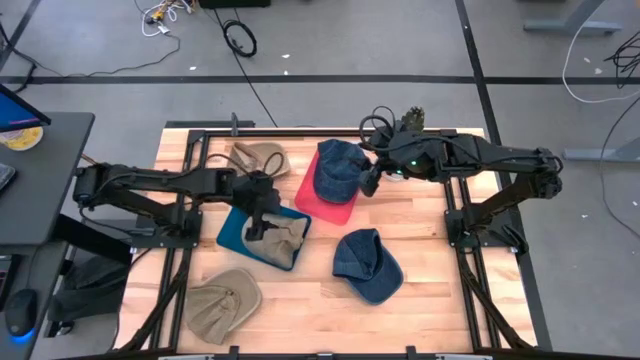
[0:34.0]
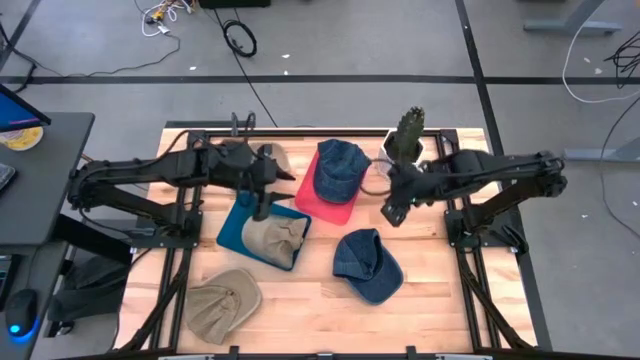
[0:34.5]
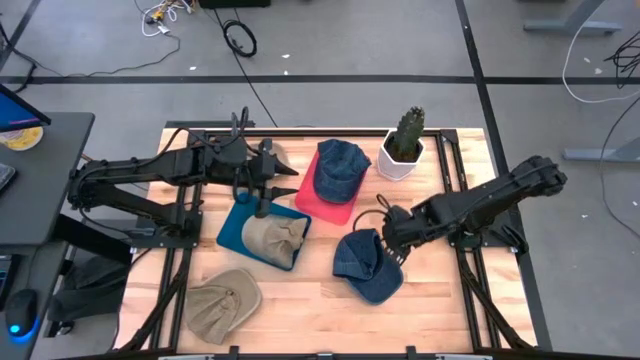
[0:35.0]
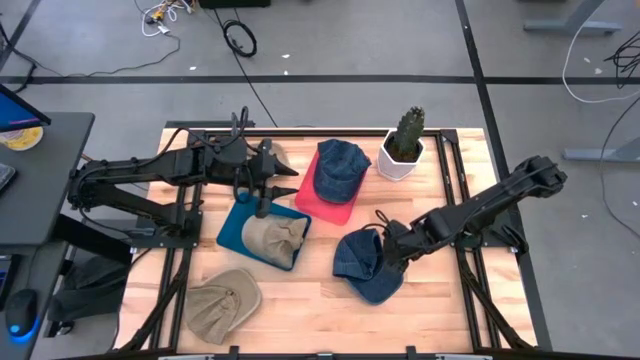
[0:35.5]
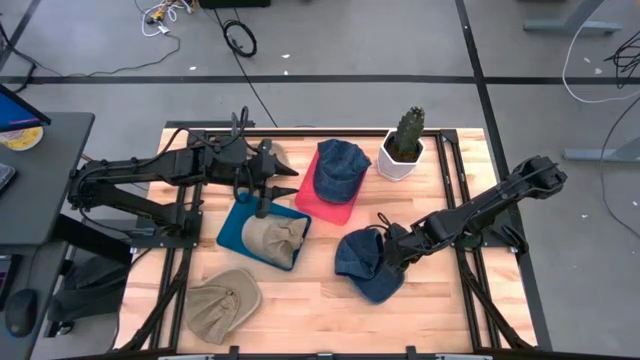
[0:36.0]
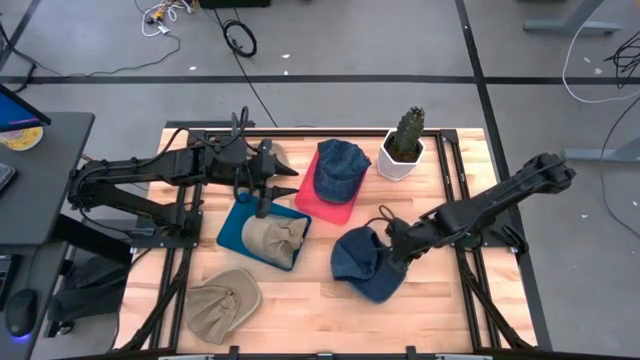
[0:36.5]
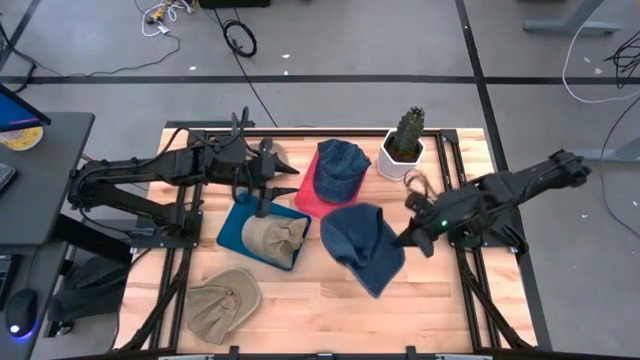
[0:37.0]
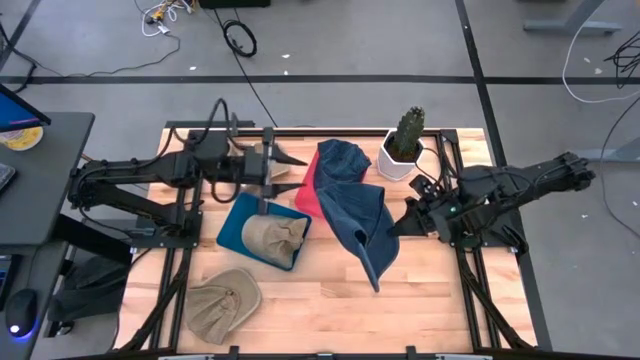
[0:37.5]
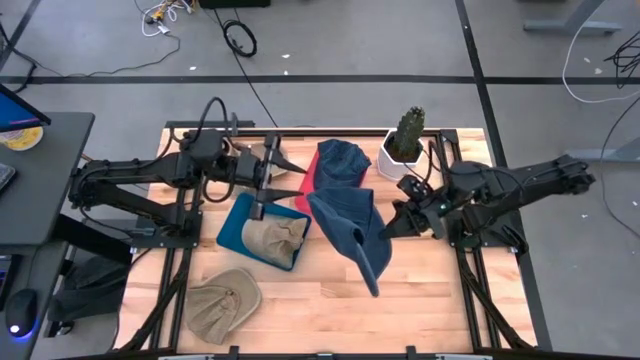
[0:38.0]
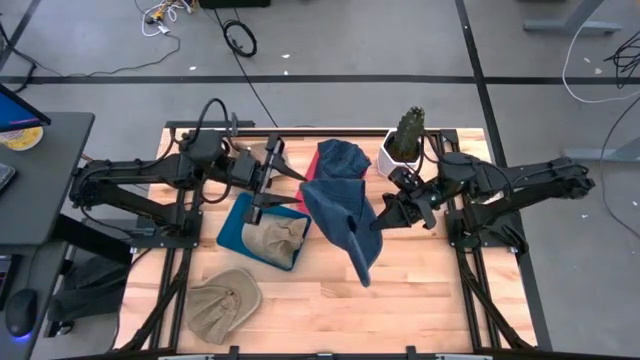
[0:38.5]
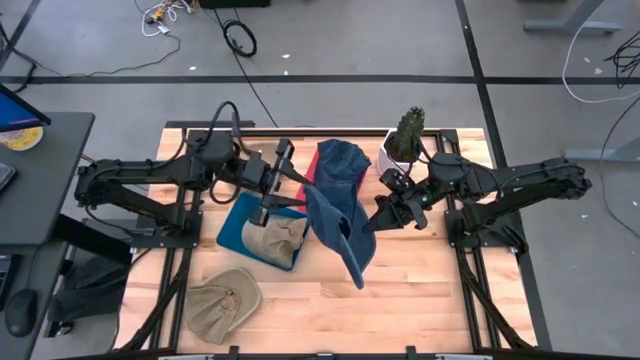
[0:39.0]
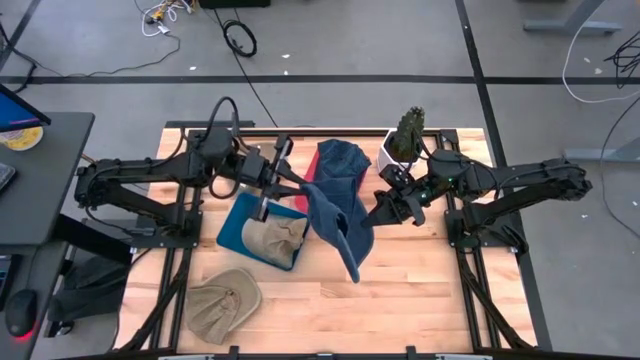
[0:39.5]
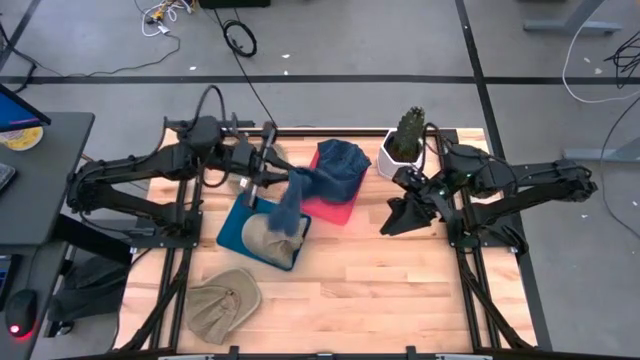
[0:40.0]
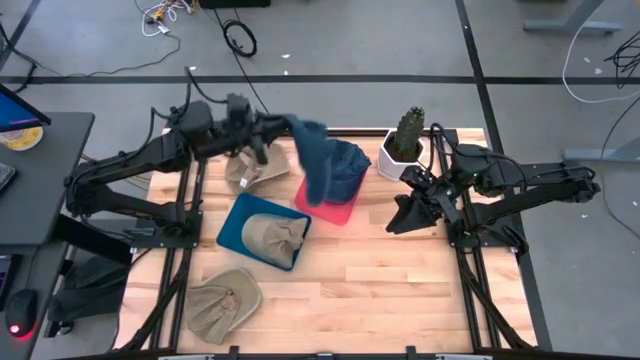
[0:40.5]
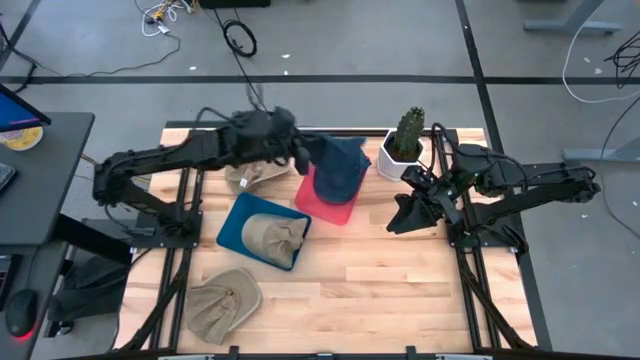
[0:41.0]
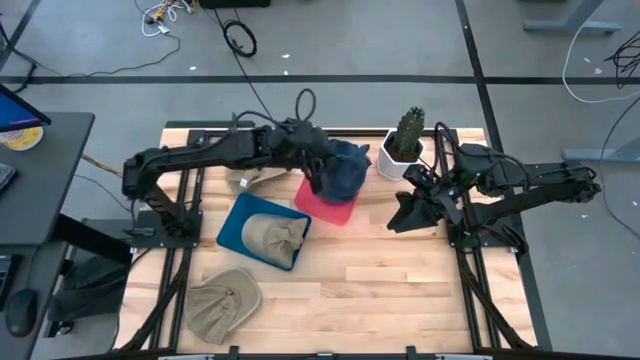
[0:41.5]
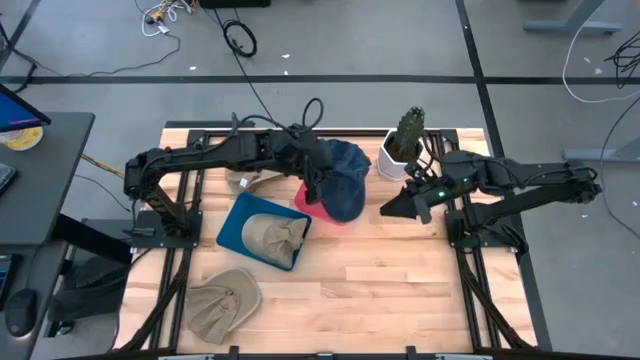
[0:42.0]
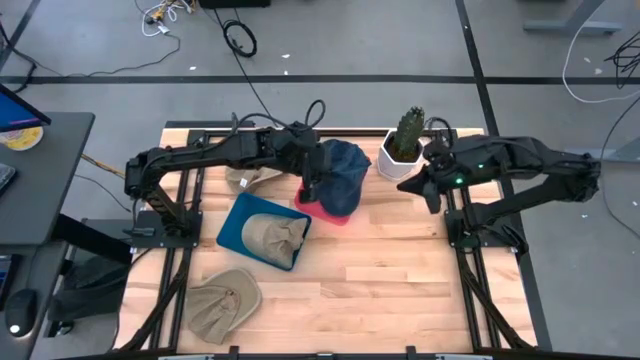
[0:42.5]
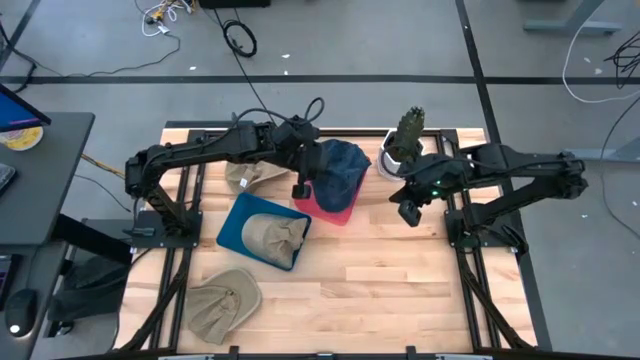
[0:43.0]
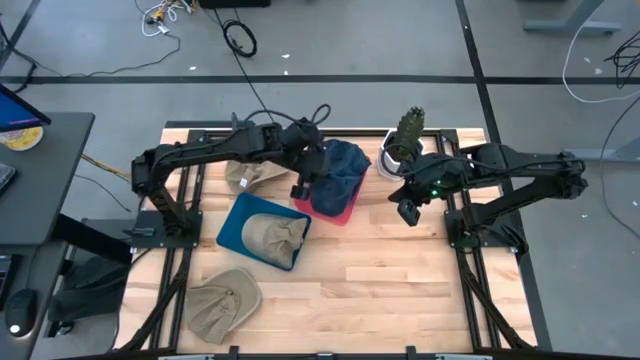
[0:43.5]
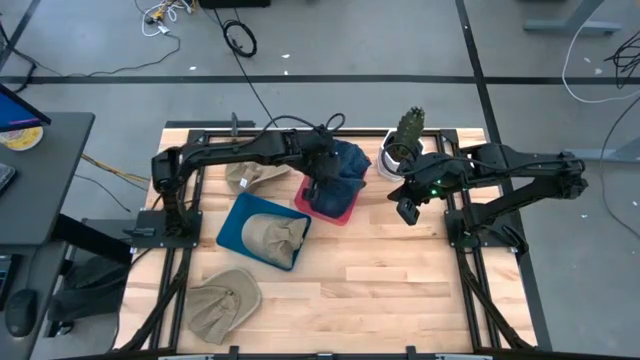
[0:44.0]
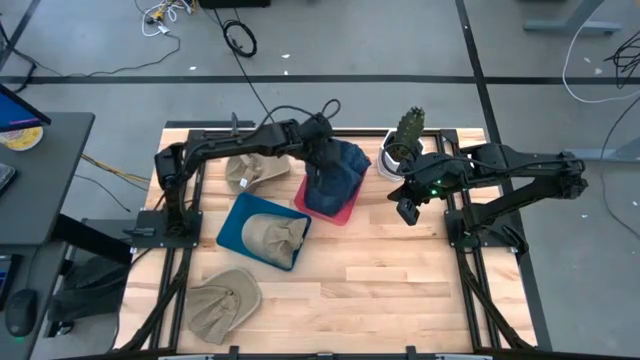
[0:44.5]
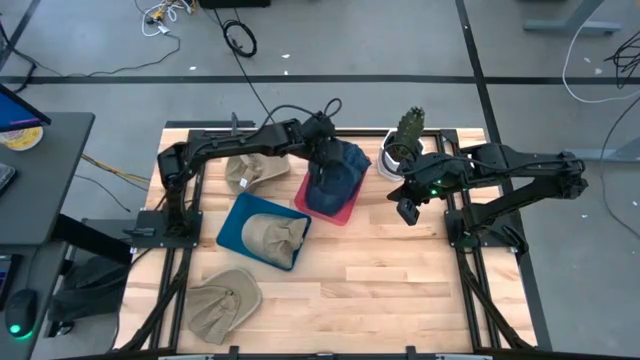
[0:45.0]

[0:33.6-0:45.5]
Task: Pick & Place hat
Put the blue cap into the red bin

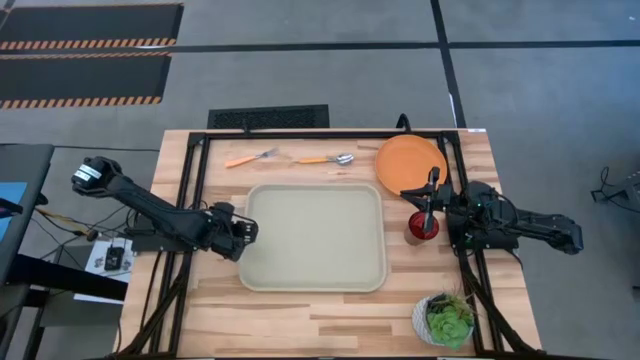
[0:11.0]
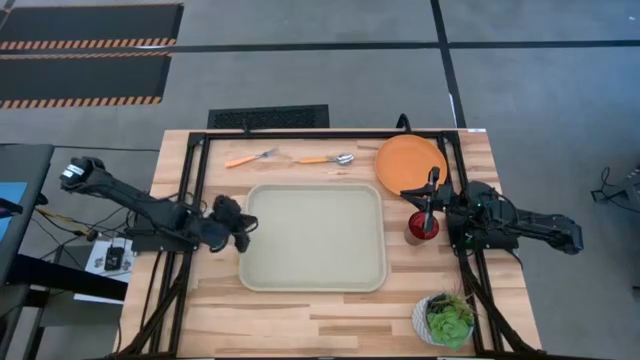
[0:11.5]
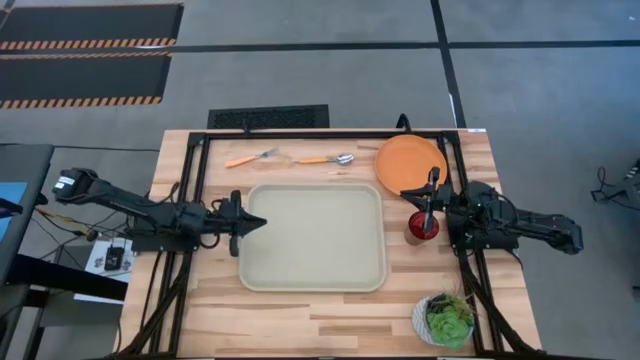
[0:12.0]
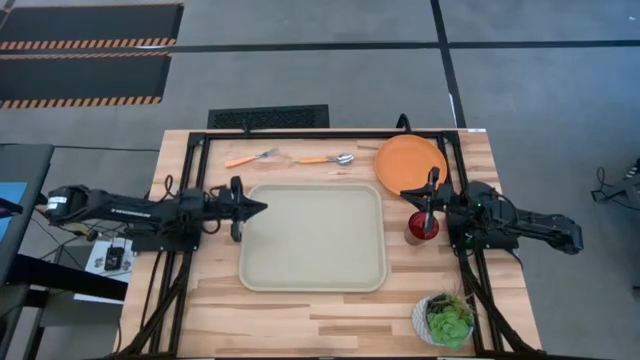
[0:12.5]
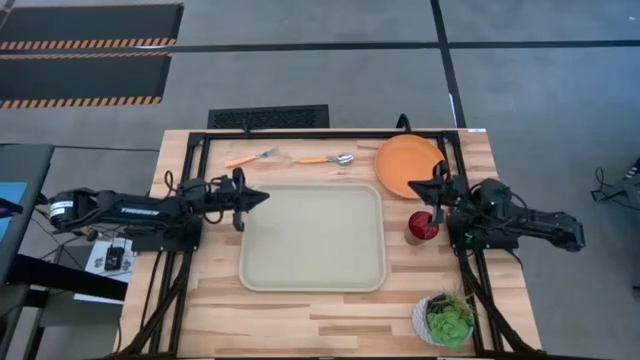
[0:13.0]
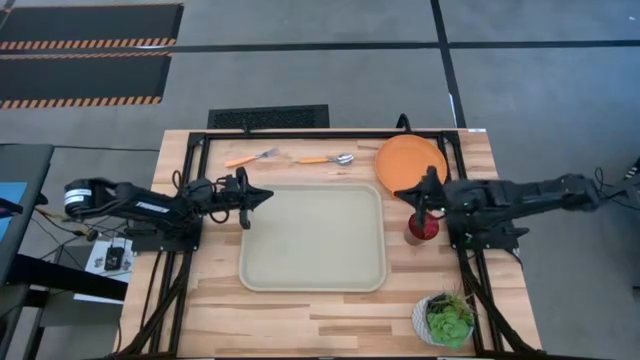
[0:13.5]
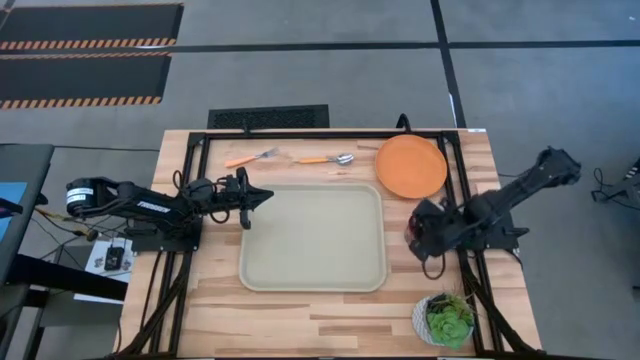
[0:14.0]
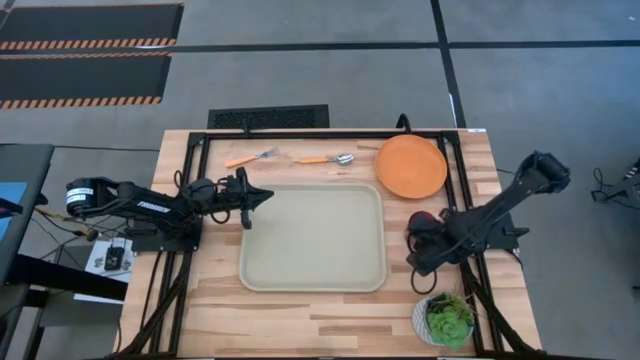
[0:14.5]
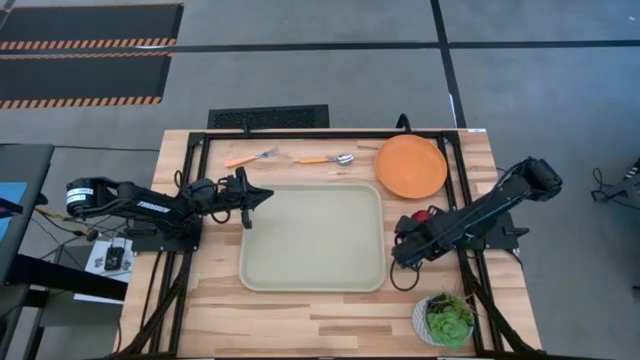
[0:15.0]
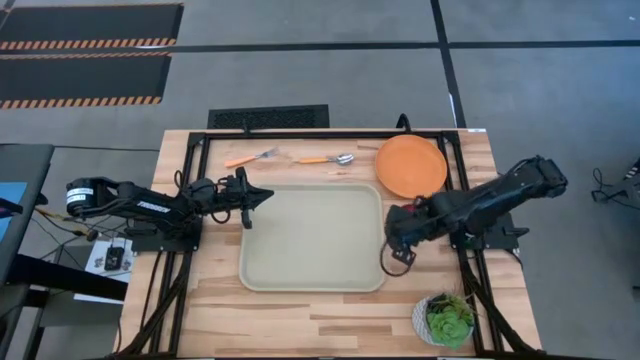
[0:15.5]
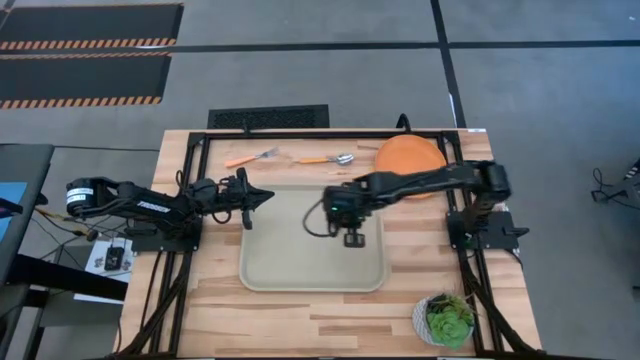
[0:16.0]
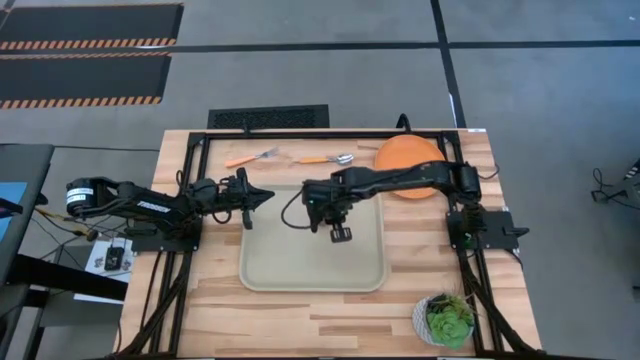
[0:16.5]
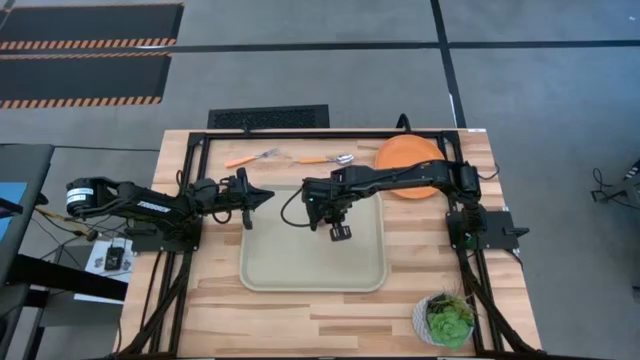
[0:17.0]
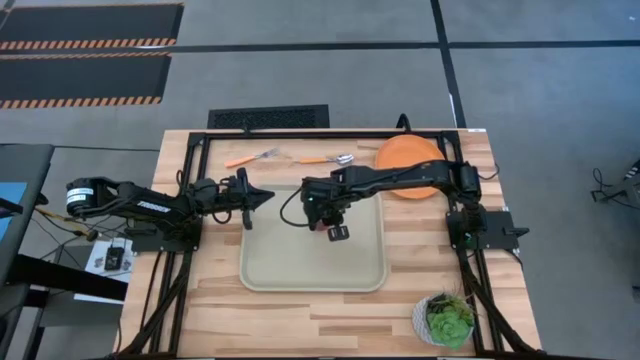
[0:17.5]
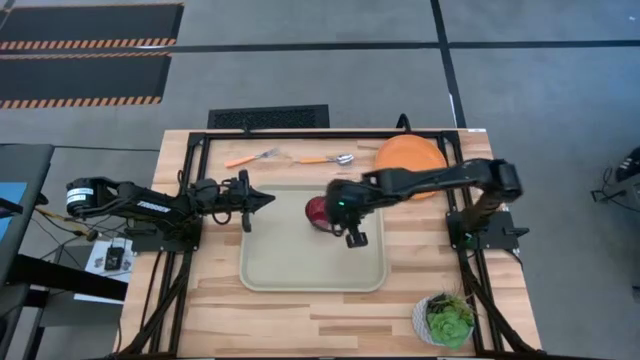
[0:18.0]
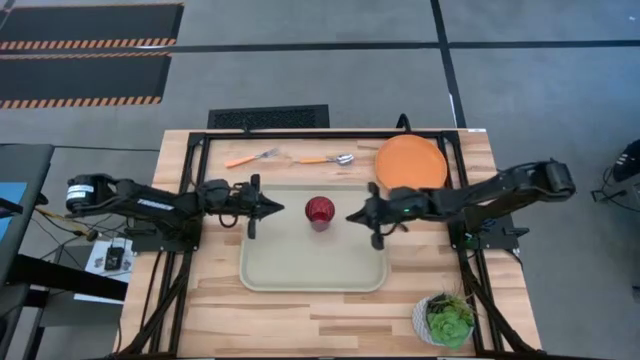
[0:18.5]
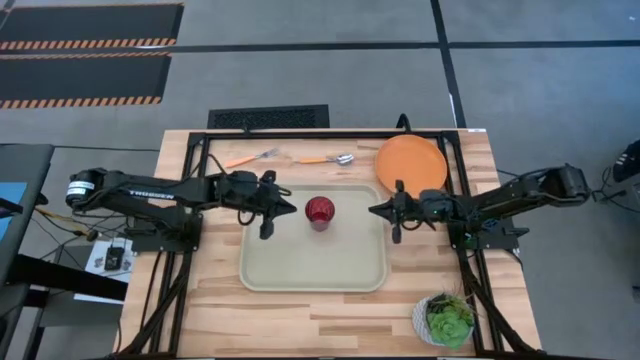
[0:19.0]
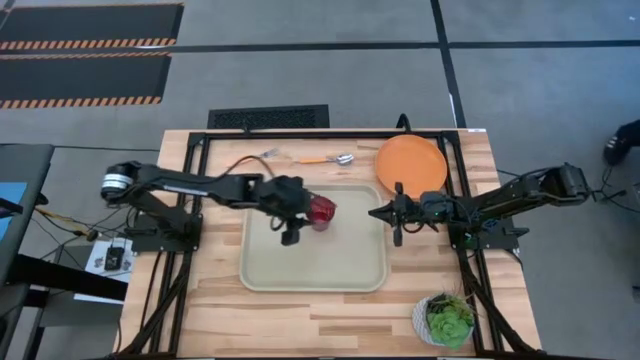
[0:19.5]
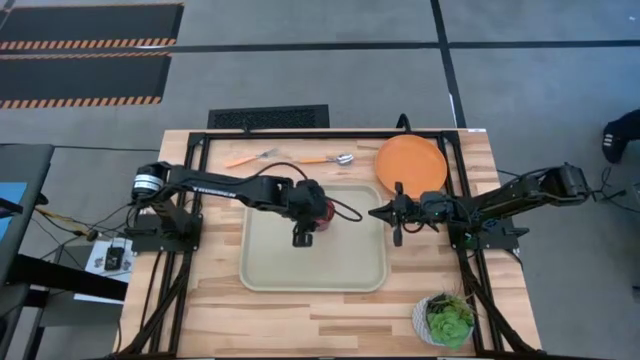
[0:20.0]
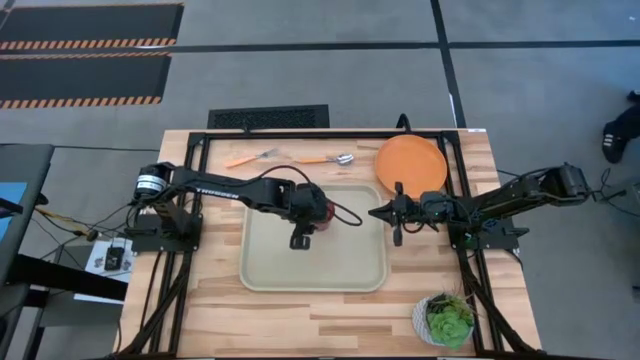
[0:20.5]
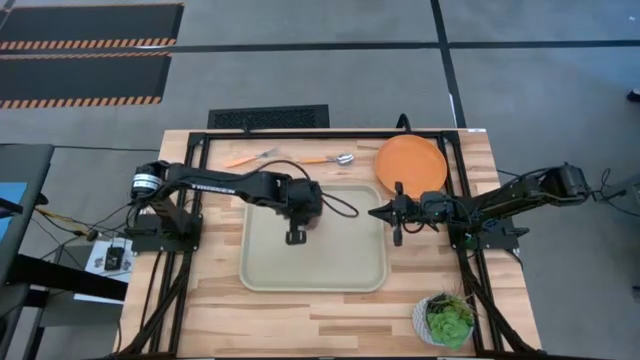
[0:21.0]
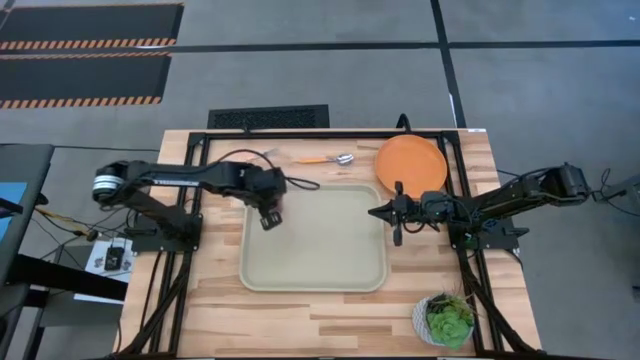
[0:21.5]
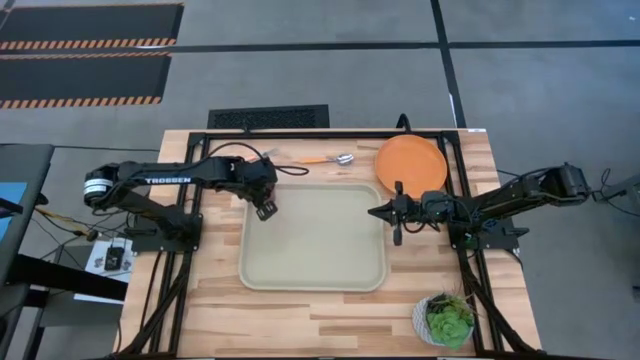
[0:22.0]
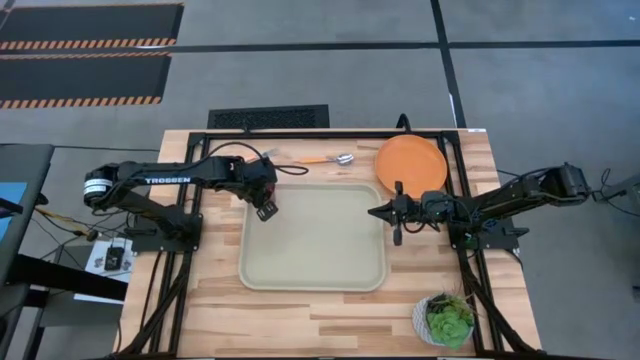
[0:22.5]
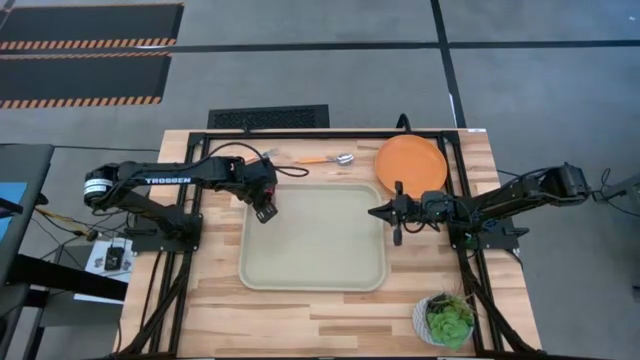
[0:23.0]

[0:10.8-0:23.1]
Task: Pick and place plate/cup/fork/spoon on tray
Put the red glass on the gray serving tray
